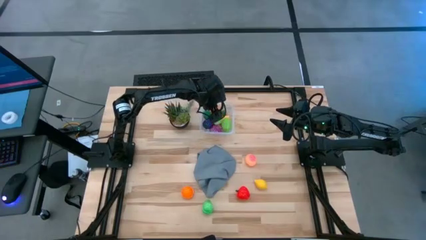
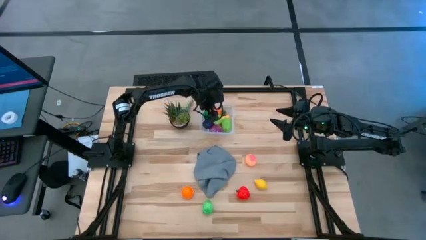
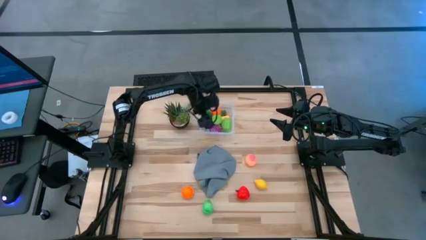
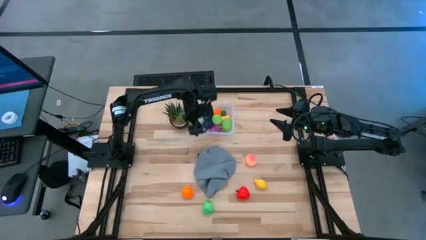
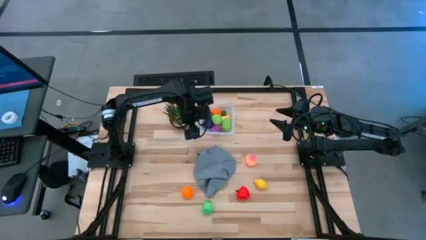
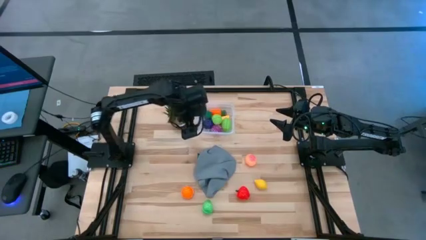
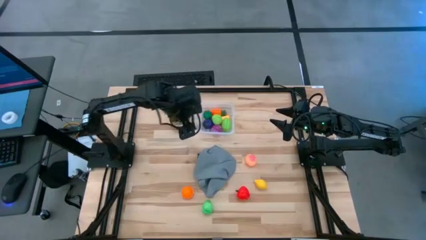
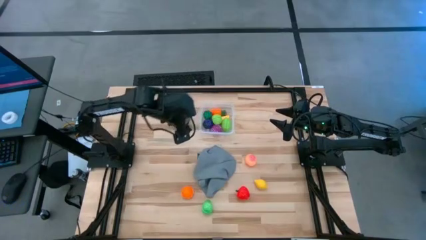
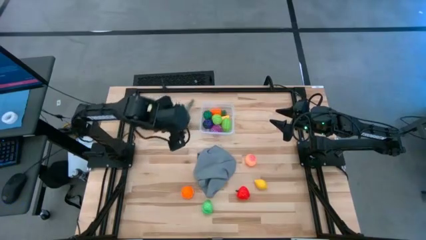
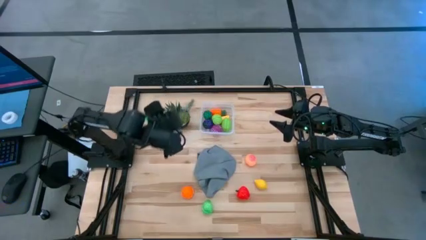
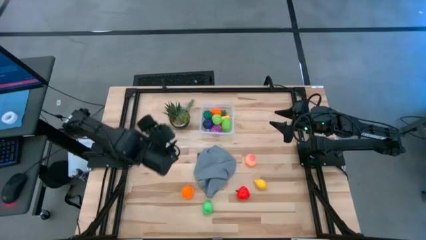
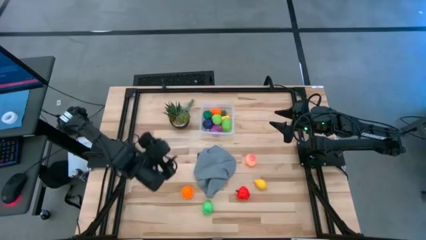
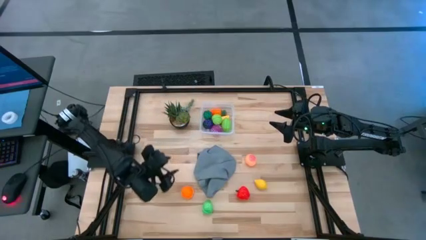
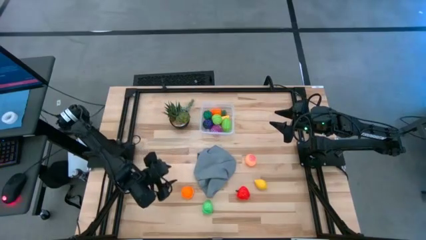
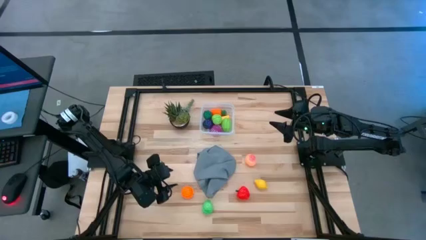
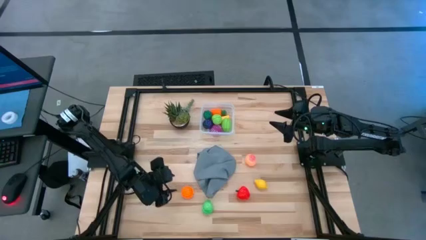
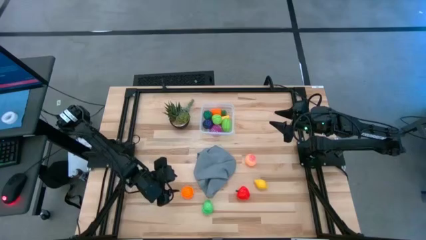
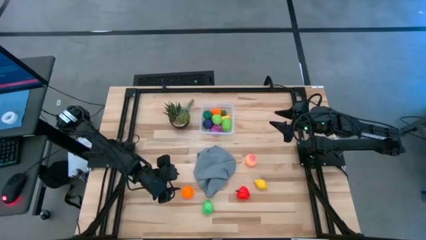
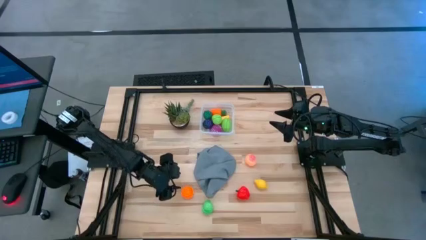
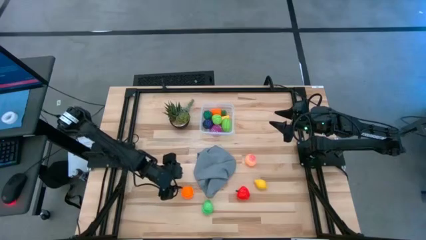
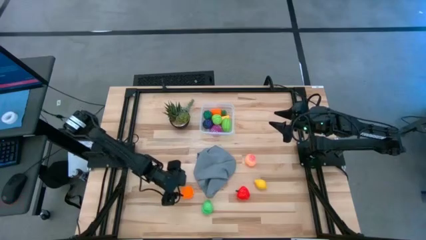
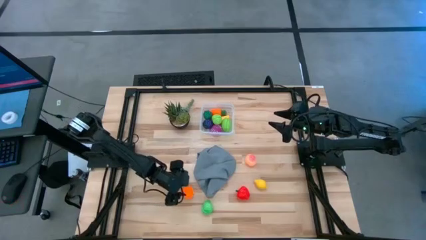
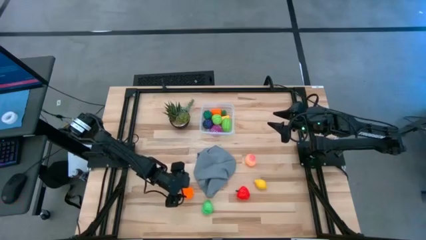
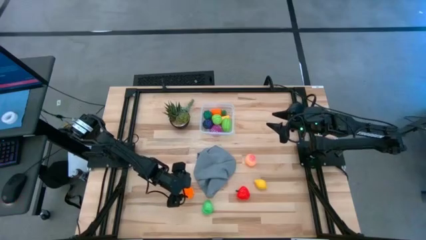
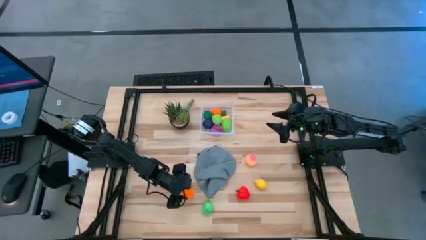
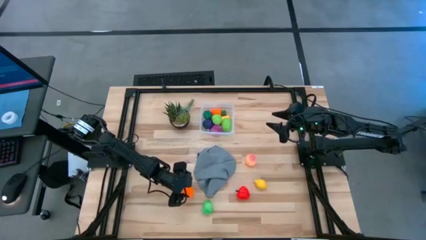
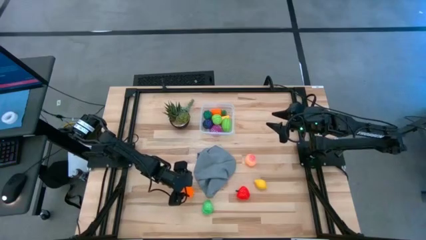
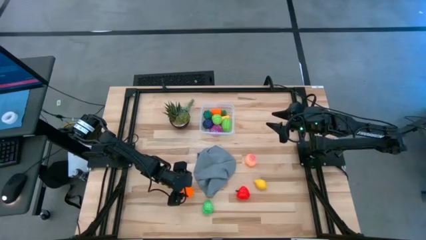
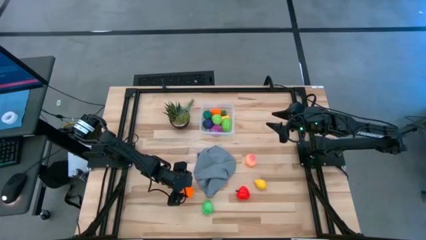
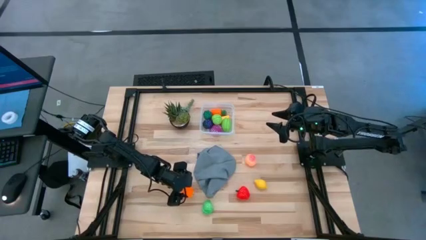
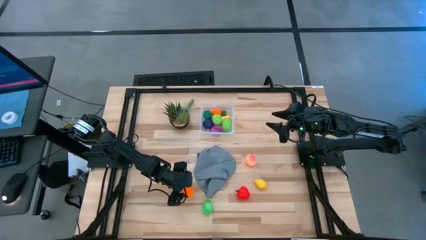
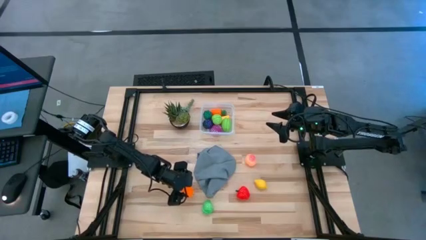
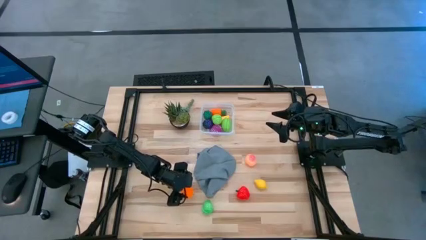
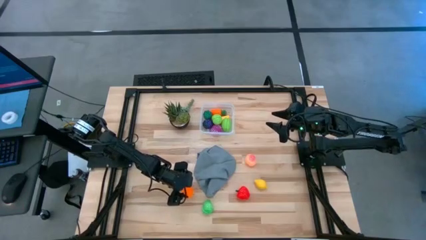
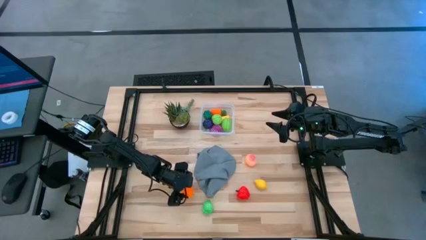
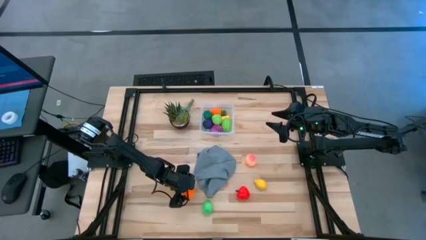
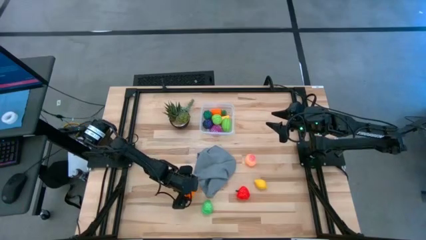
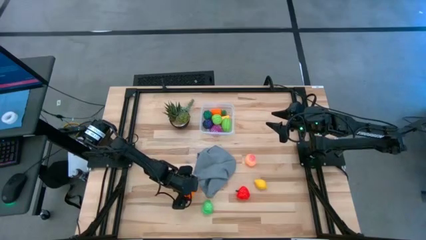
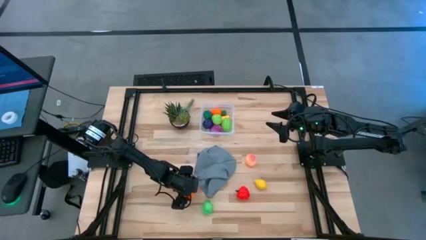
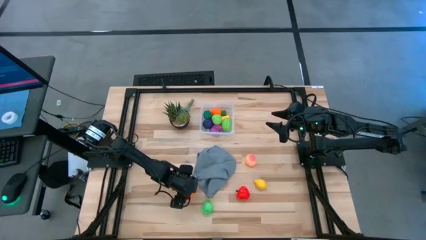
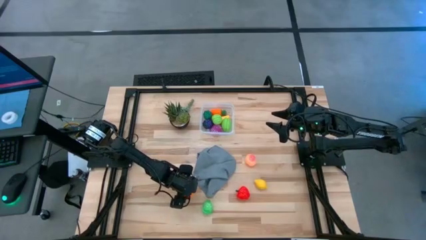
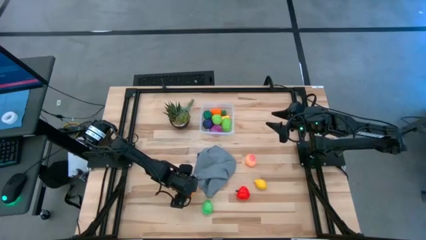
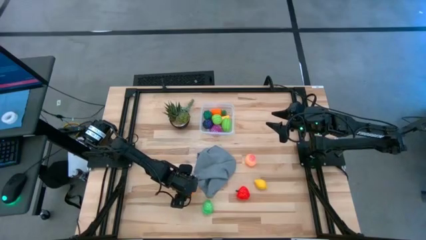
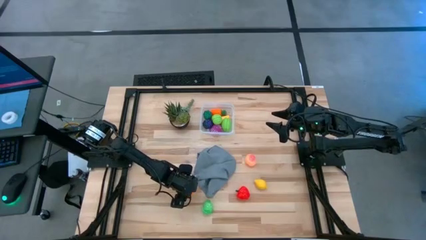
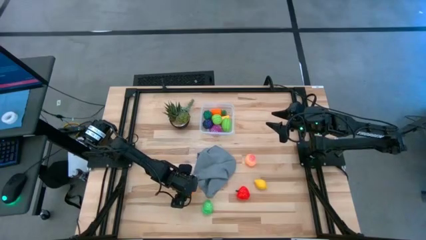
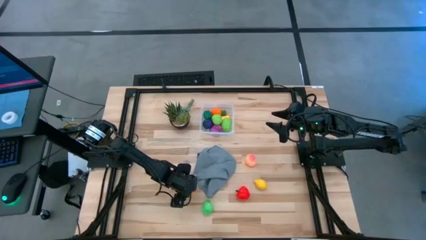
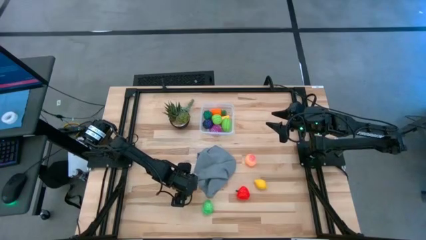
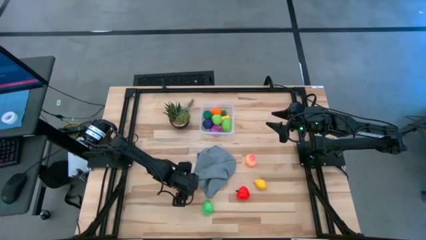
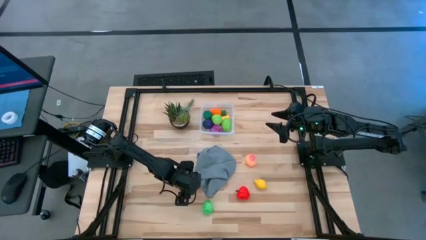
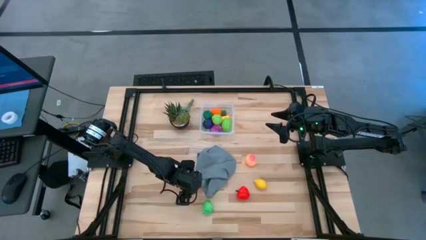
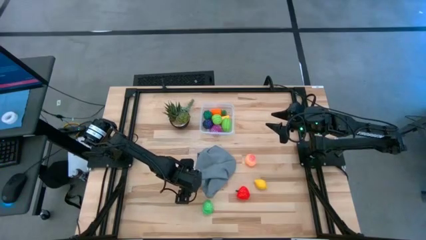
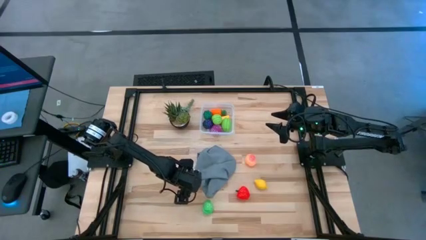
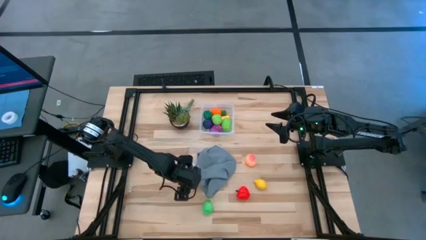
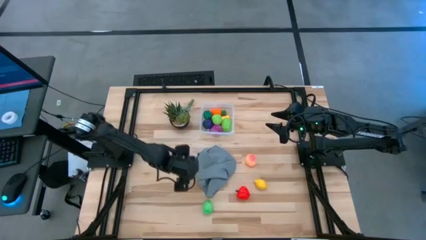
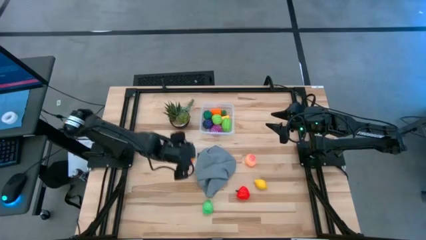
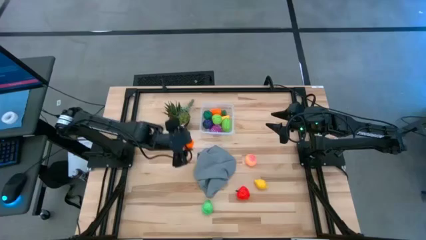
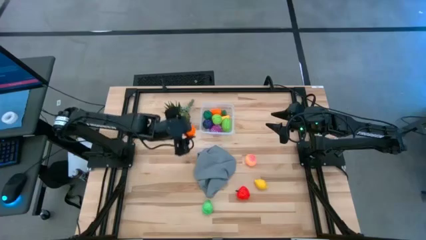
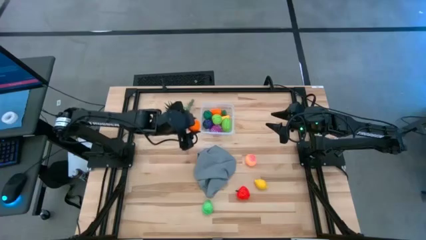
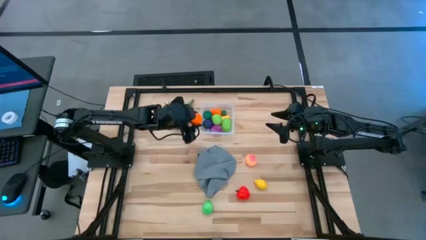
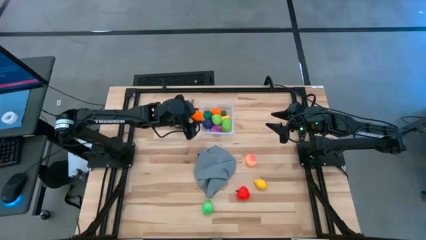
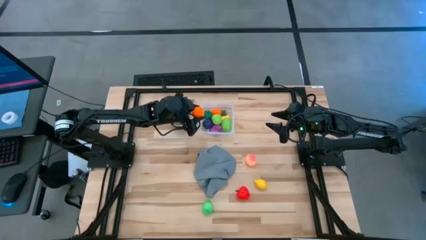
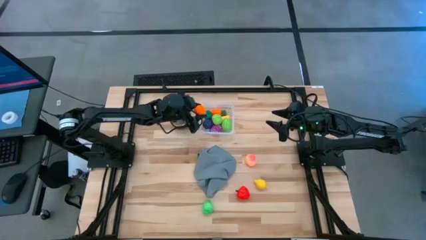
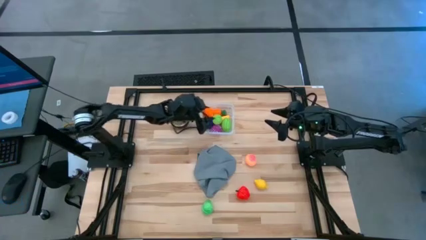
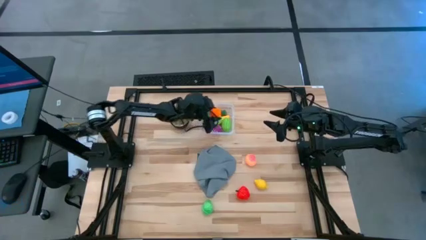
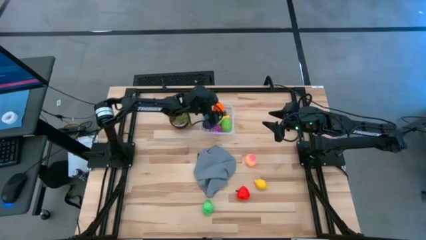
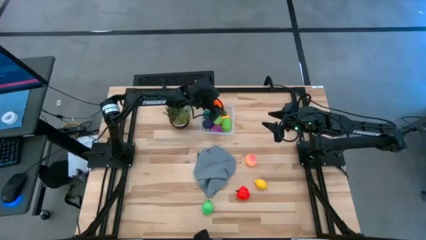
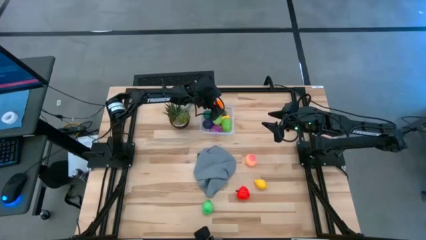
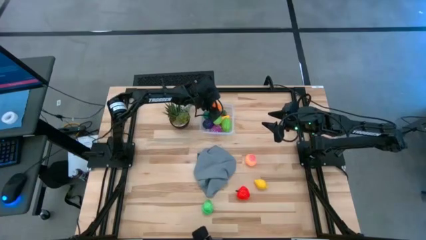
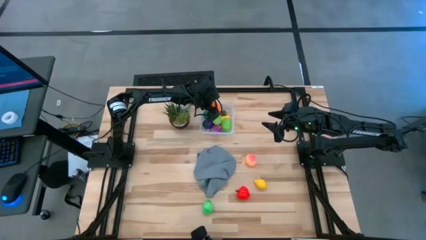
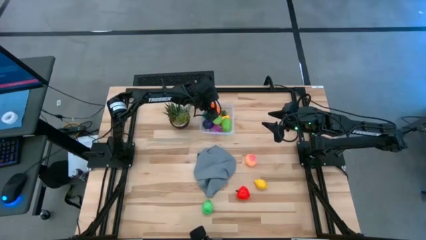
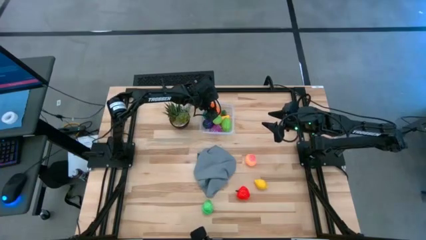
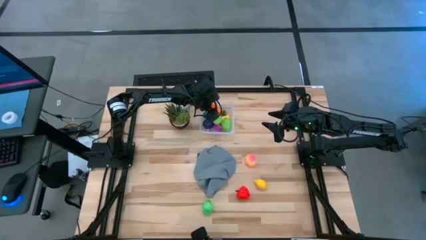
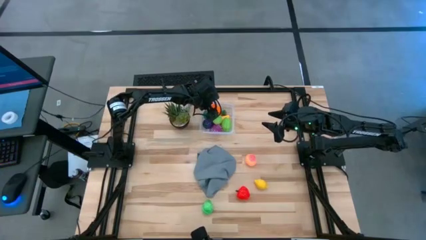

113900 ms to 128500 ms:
Task: Pick and placing Produce into tupperware
Put the orange pumpkin into the transparent container

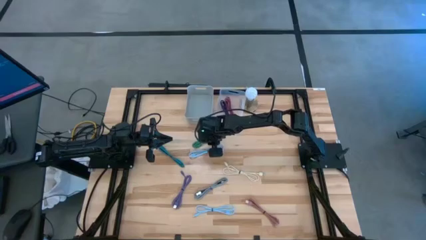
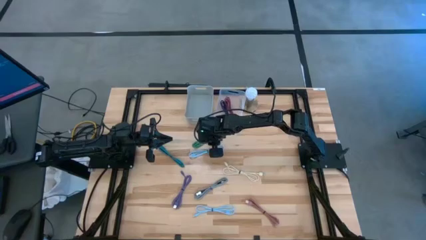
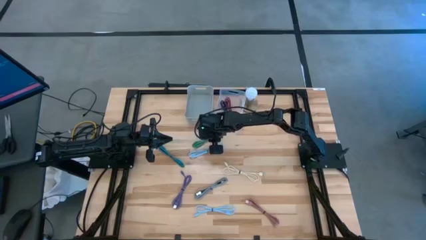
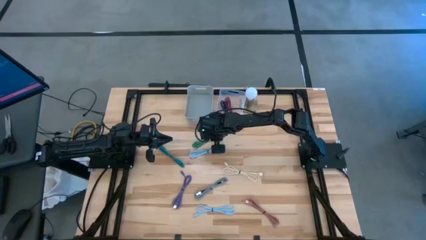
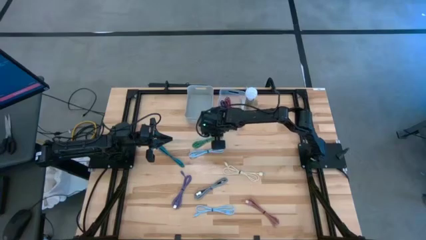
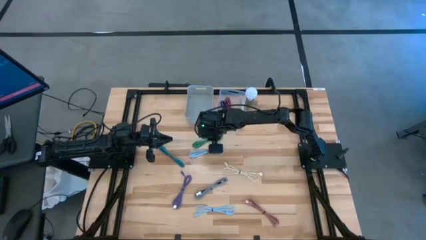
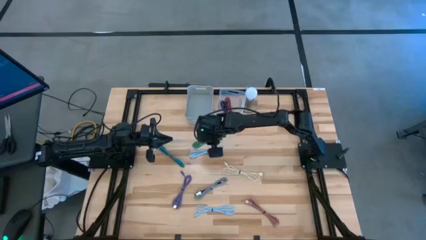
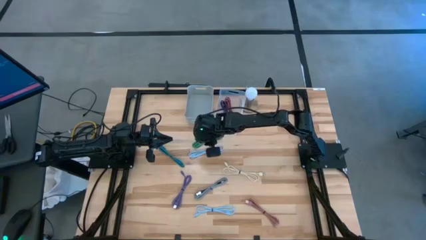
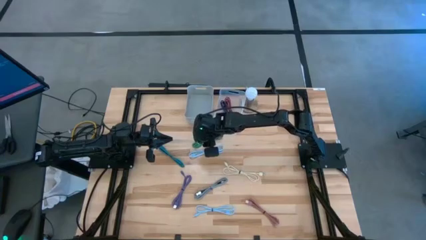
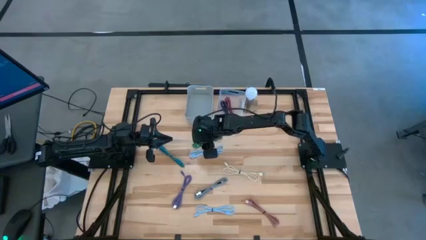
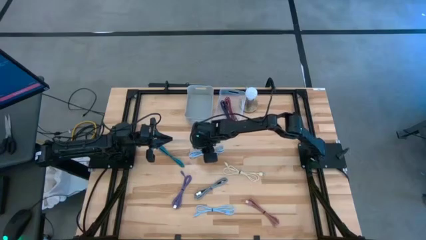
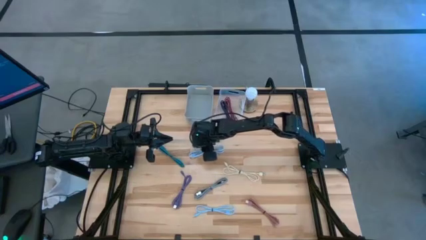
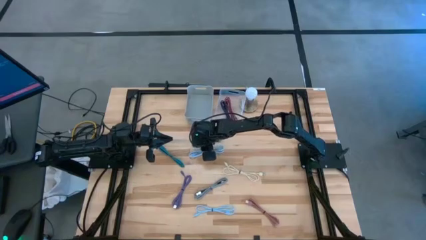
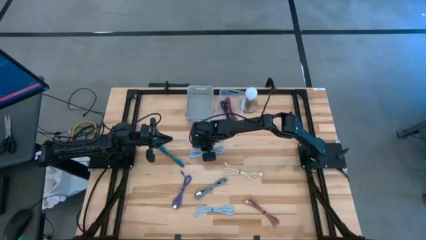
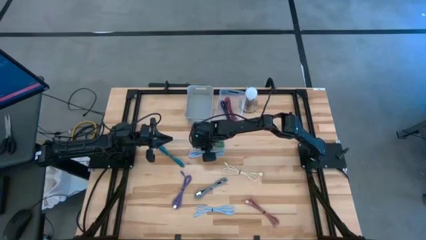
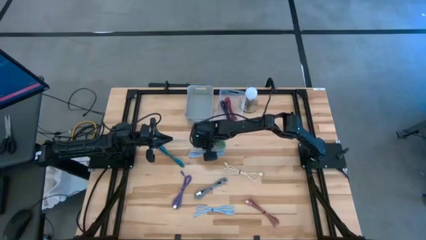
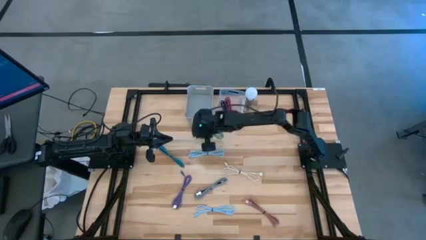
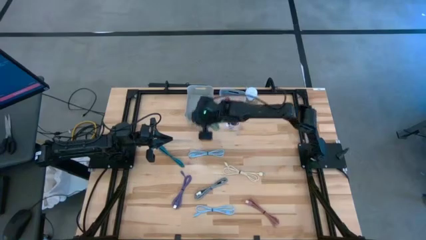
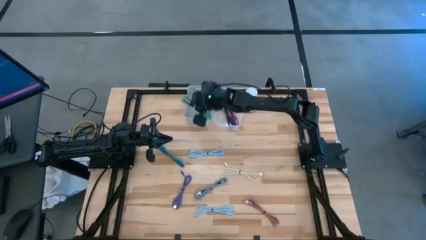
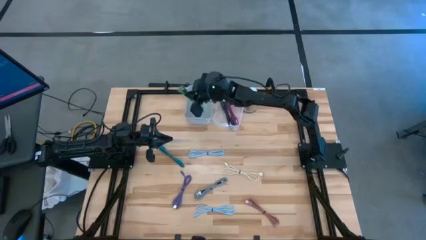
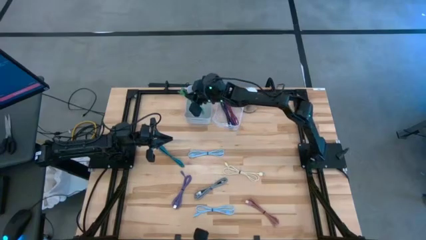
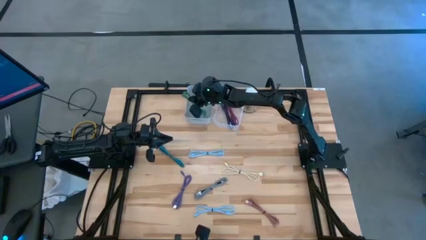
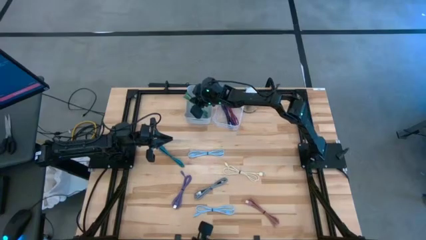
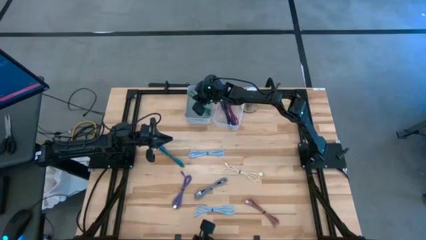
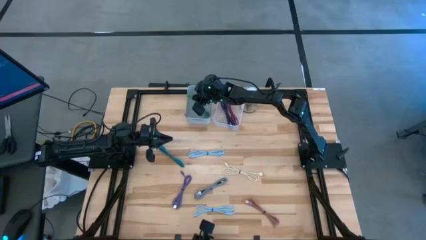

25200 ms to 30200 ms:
Task: Pick & Place USB Port
Put the green charger cable into the white bin
